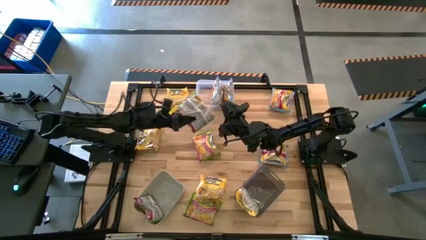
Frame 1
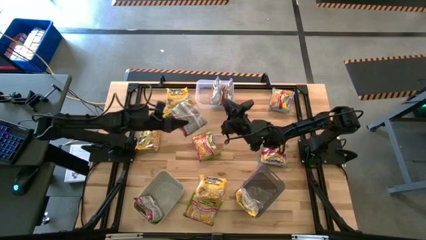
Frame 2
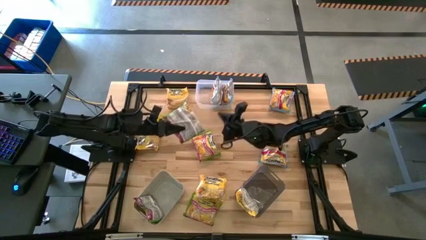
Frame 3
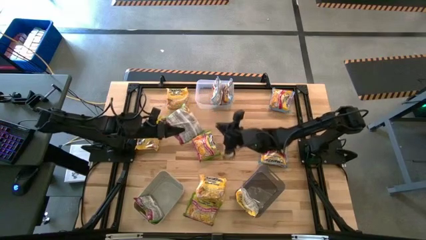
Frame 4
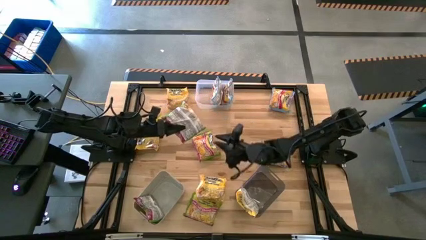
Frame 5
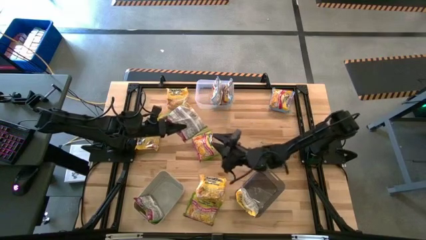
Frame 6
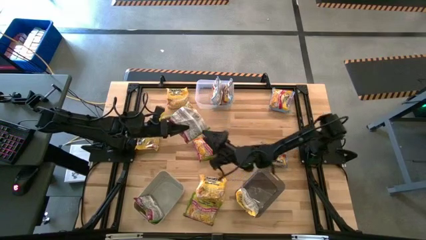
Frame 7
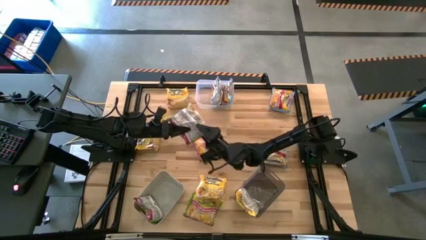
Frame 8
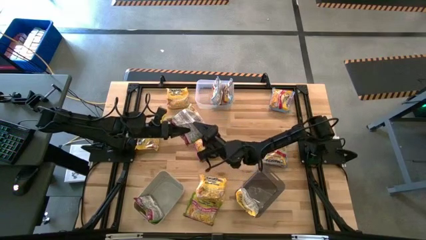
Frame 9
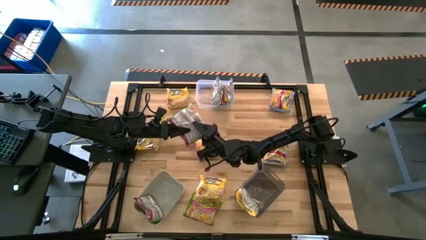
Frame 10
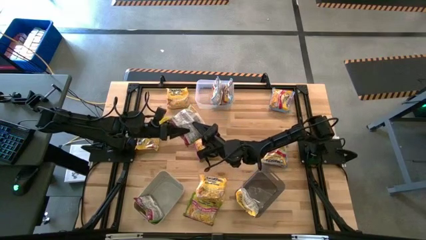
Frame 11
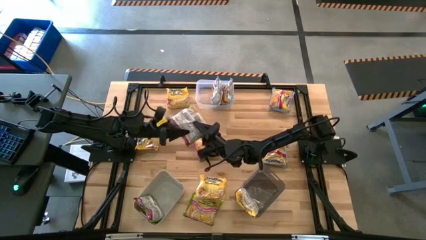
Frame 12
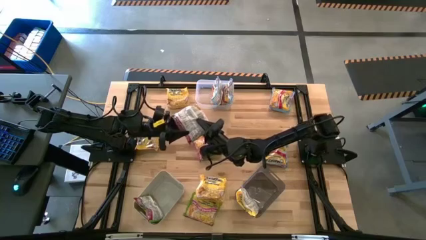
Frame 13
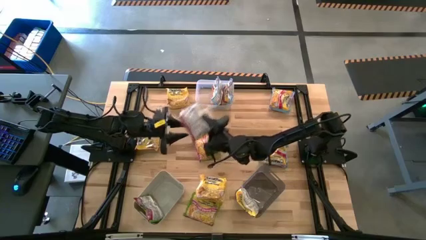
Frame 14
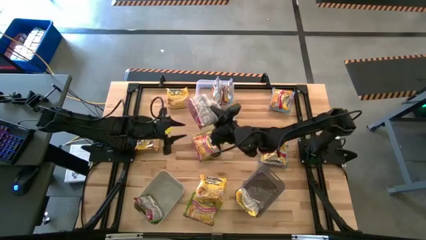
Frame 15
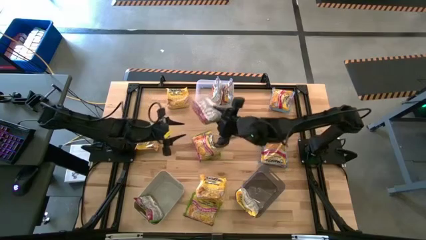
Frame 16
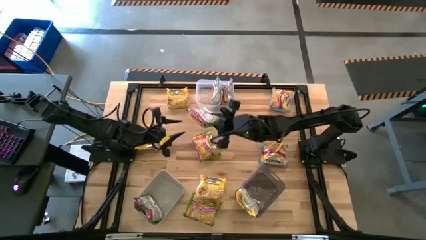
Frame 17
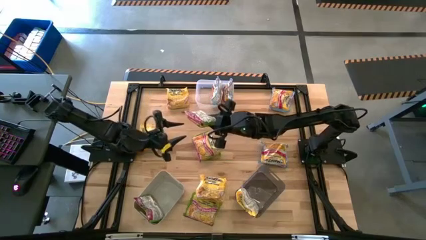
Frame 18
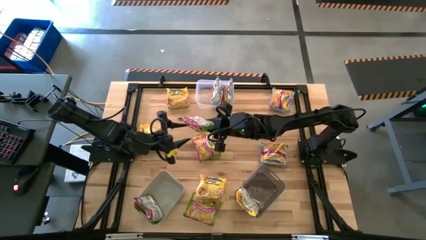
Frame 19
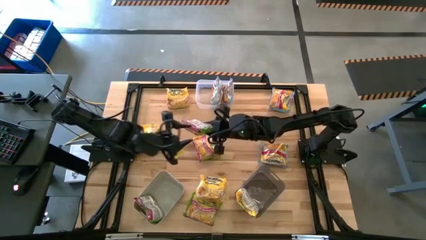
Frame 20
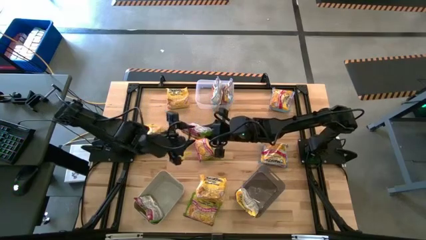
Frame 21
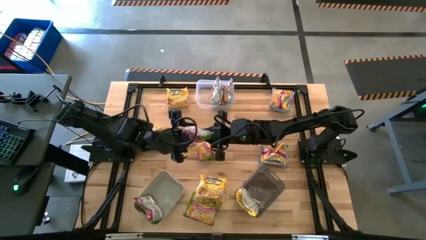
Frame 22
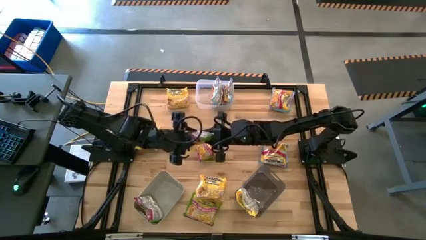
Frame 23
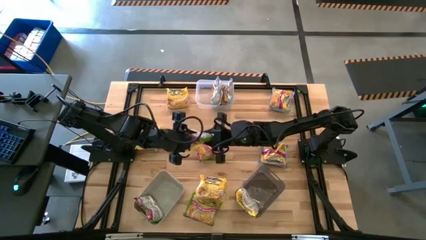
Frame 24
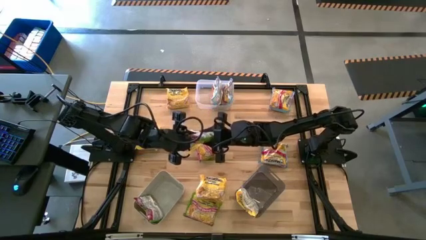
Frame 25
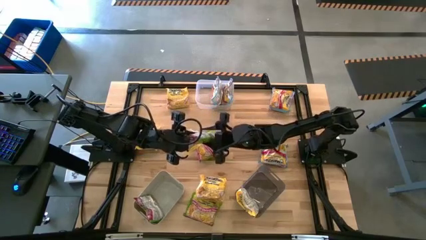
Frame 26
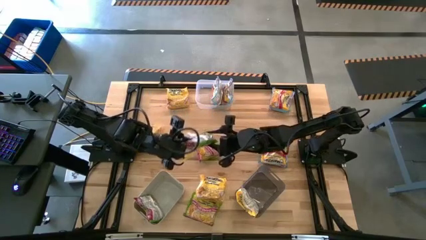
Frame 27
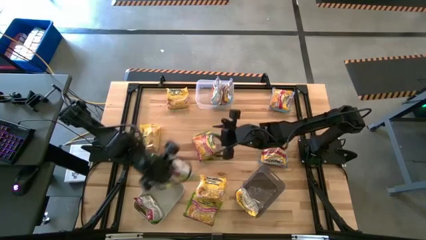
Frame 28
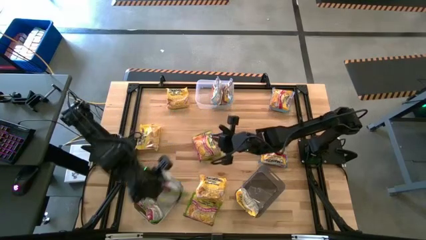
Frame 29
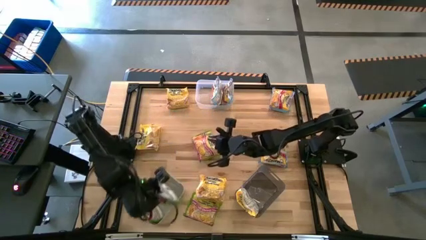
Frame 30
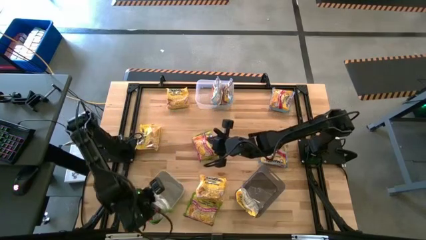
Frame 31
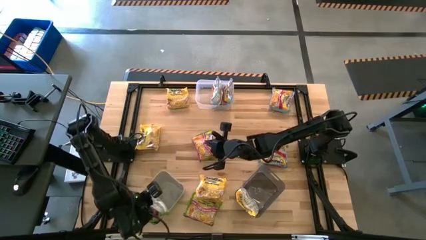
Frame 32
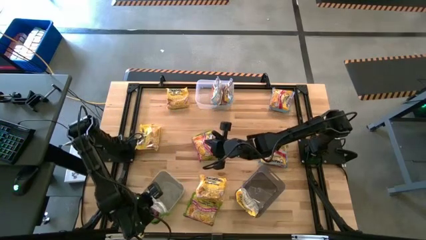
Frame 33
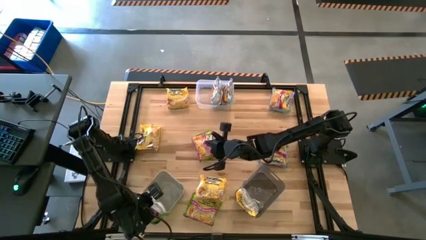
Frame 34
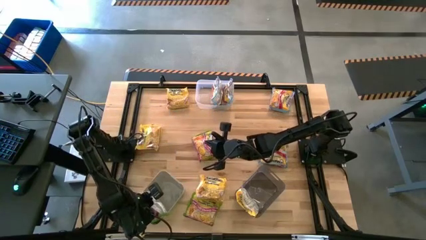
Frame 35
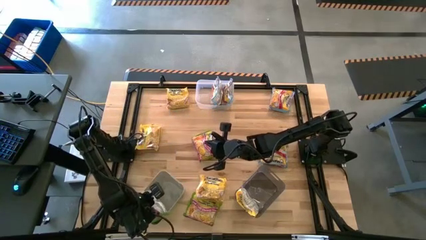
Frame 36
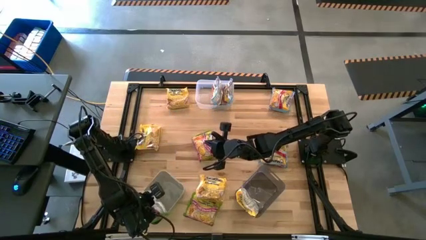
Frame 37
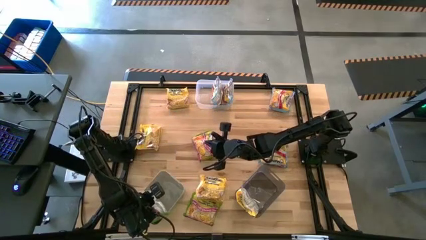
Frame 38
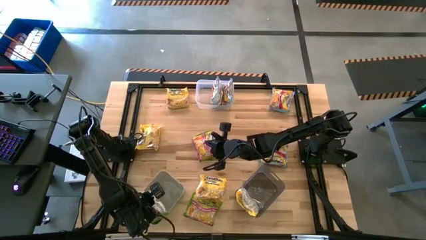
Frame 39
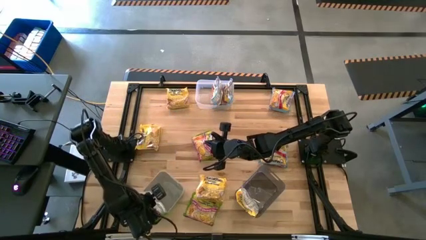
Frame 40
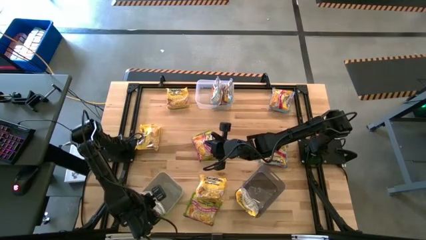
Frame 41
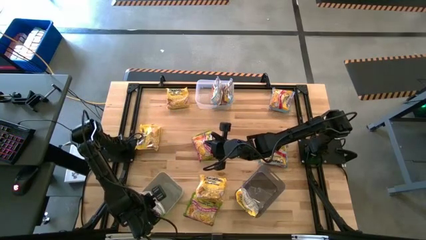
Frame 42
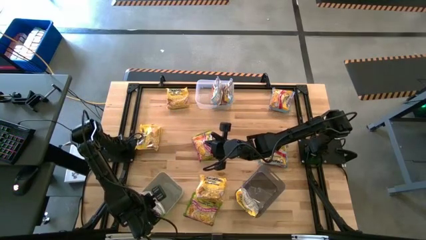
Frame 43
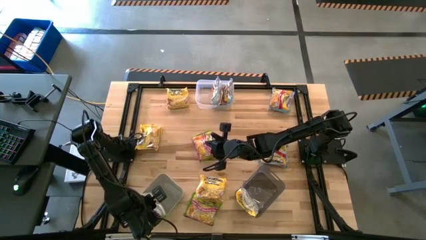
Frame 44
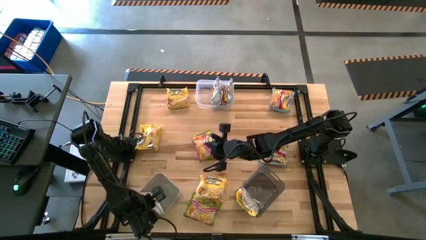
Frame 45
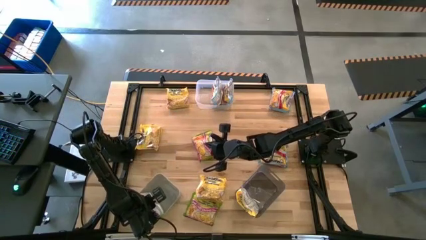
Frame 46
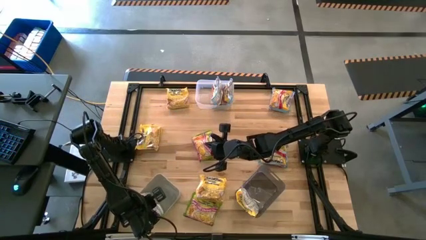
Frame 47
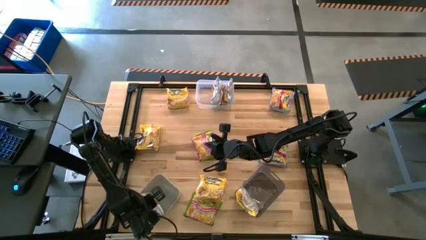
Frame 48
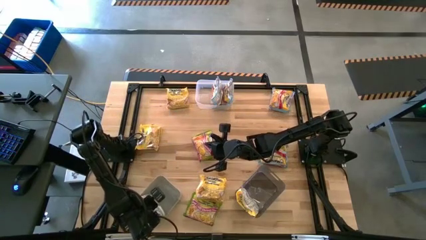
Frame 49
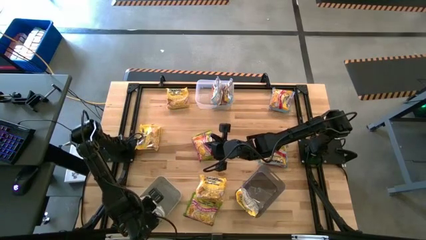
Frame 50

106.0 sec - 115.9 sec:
Task: Sort Maruchan noodles
Put the green noodle pack into the gray bin

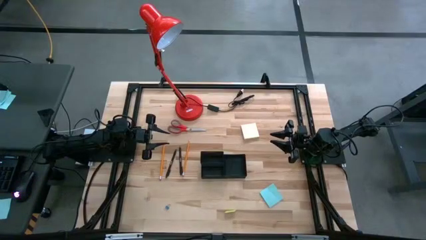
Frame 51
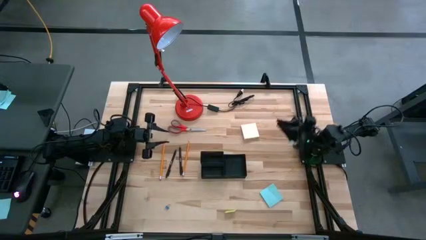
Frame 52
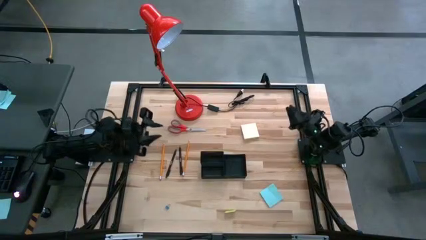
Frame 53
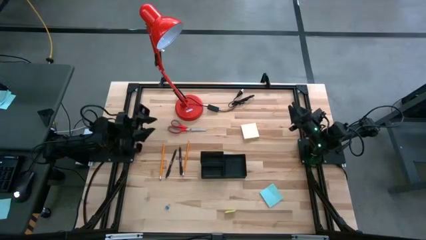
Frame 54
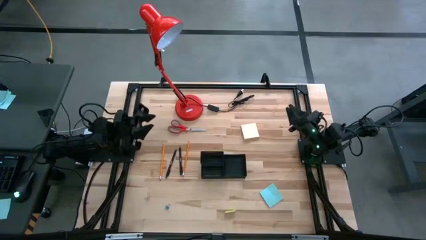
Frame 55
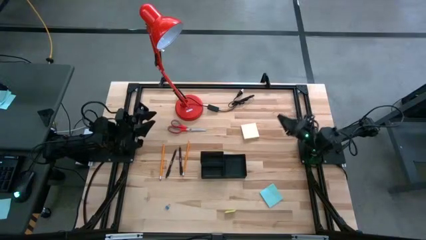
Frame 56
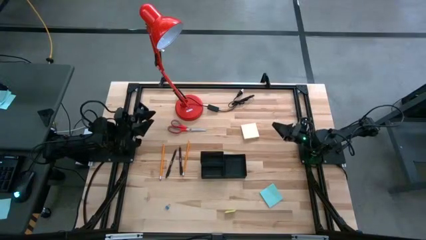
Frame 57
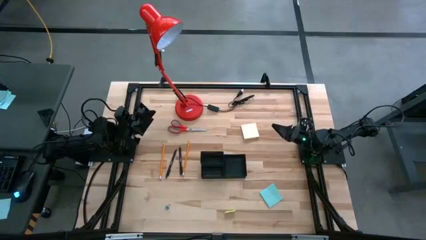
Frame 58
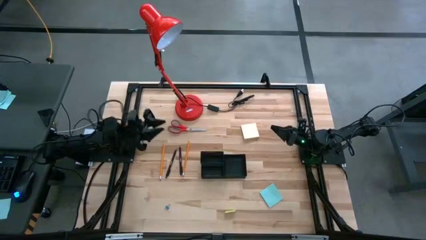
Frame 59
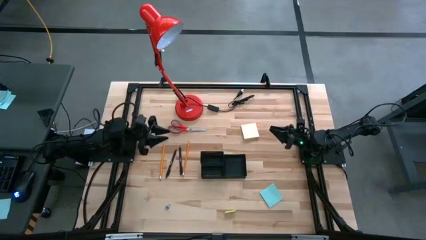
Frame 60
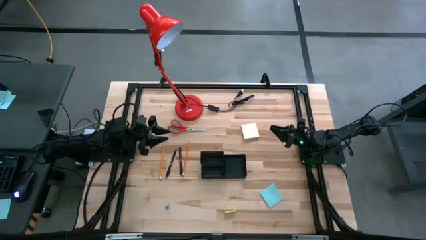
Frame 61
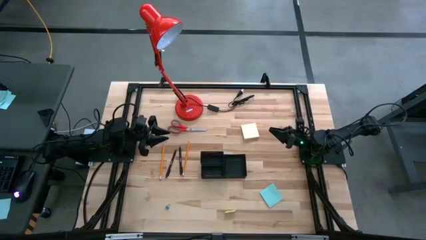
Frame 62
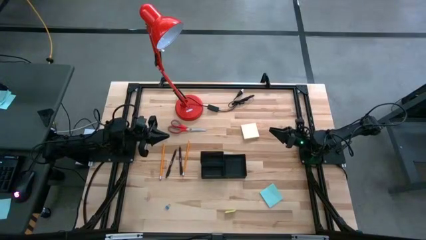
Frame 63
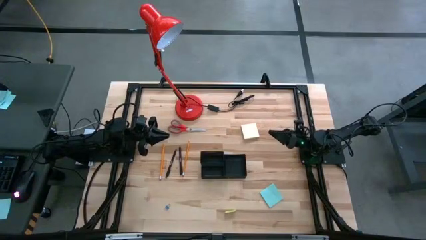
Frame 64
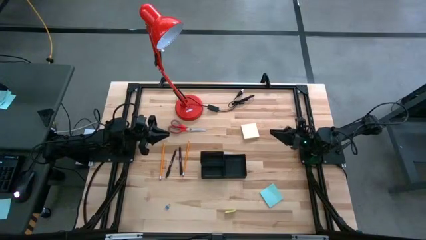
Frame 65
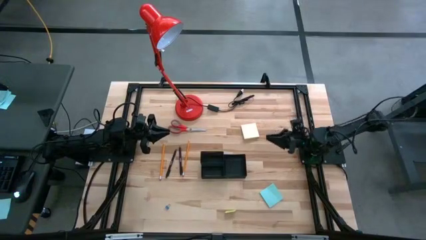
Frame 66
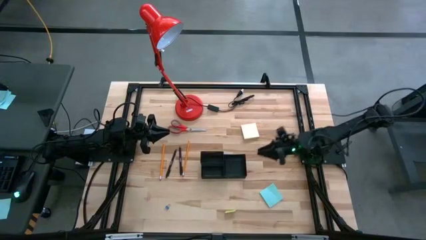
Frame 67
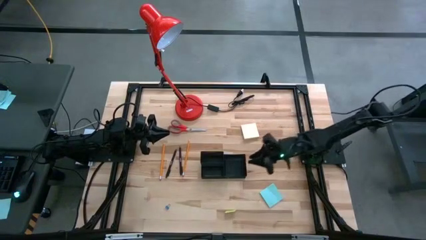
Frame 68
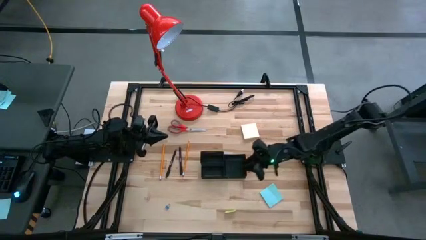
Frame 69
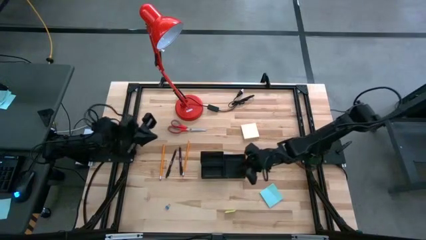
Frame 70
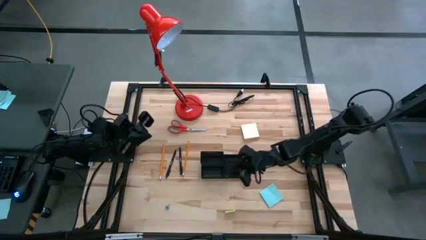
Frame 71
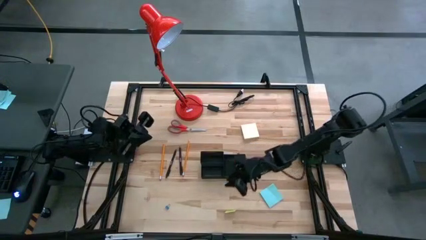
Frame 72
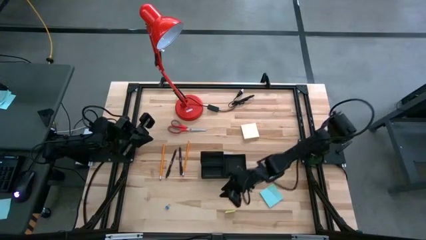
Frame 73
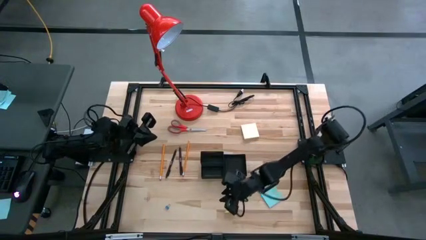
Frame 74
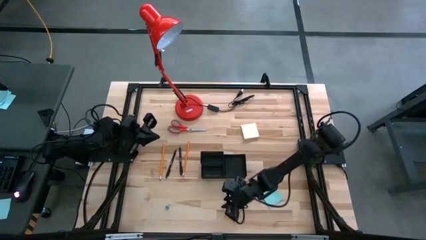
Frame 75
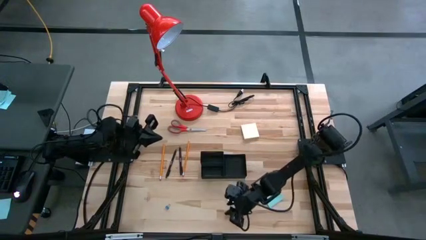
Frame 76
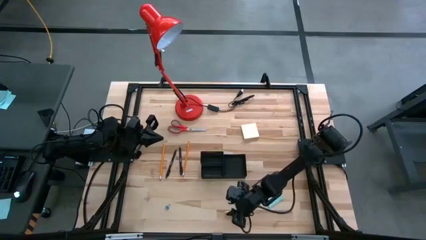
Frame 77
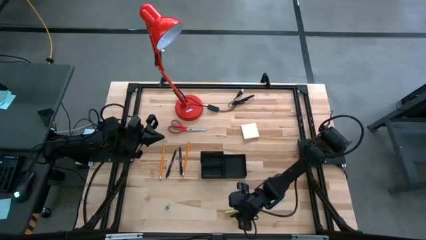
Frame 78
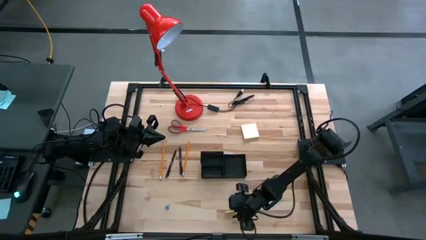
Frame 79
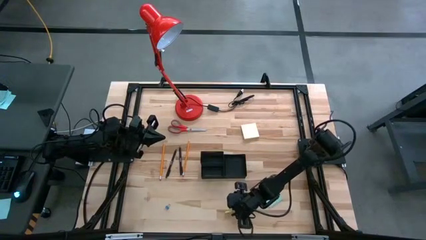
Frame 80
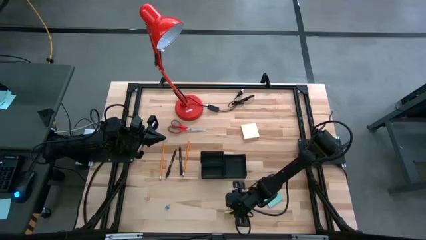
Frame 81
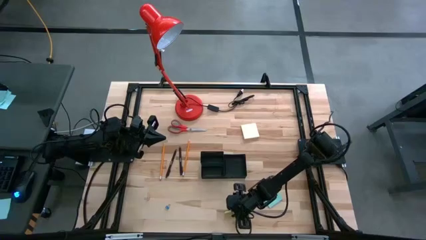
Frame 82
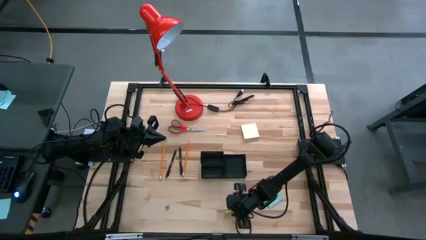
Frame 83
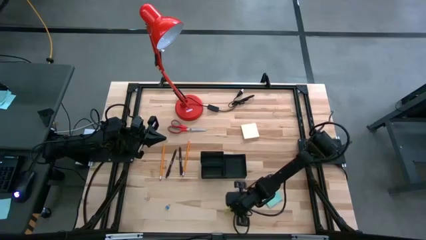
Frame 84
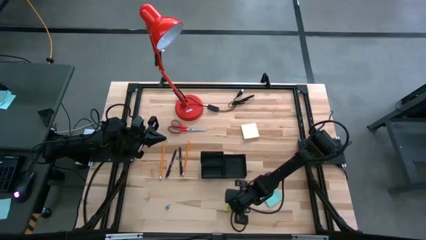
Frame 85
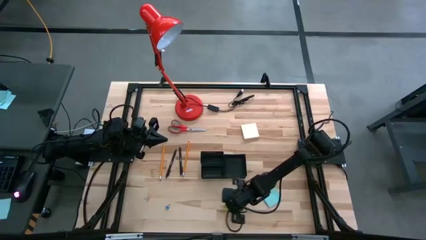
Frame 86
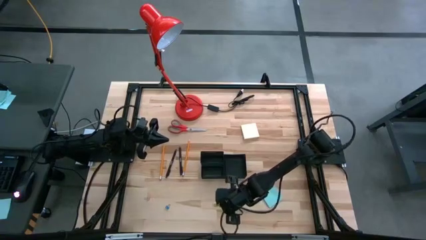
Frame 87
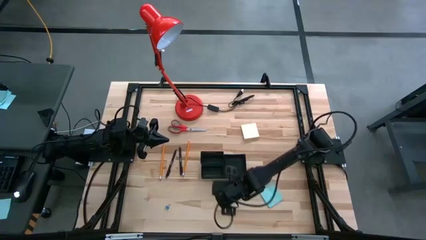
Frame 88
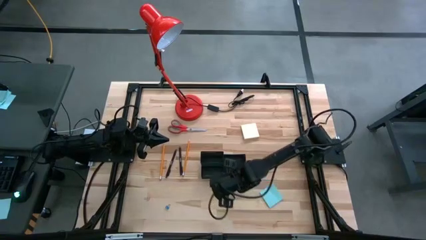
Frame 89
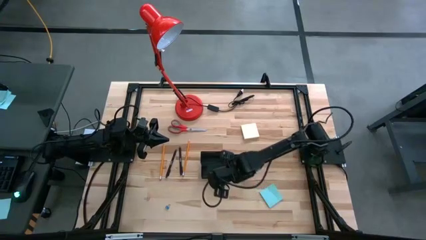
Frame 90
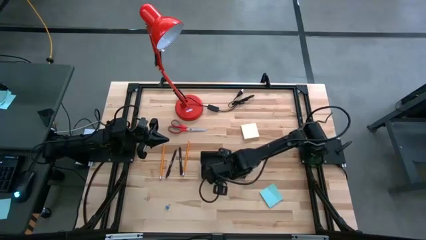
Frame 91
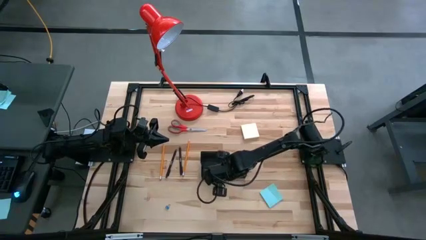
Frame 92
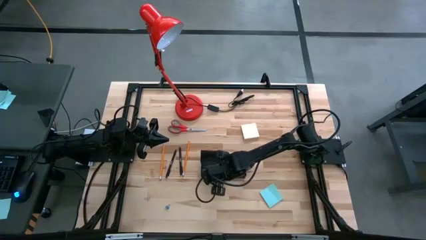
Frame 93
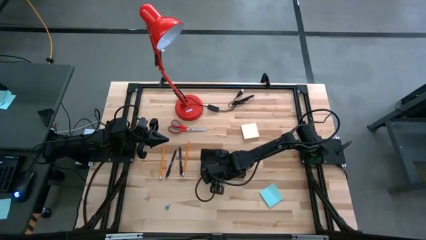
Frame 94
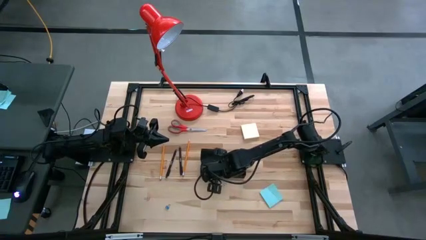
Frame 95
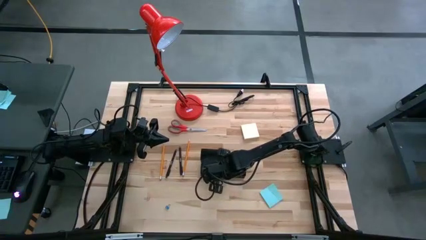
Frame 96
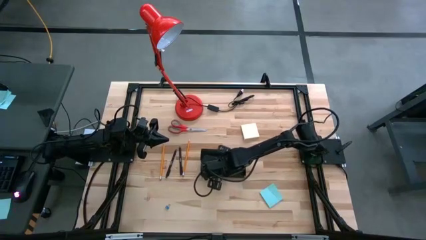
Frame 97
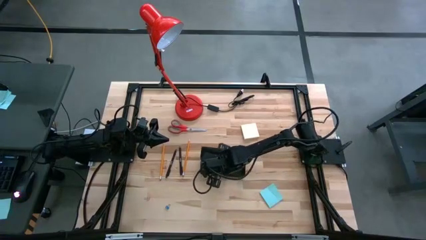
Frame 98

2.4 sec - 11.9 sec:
Task: Pick and place office supplies into organizer
Put the light green eraser into the black desk organizer
